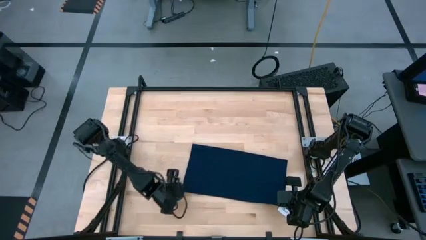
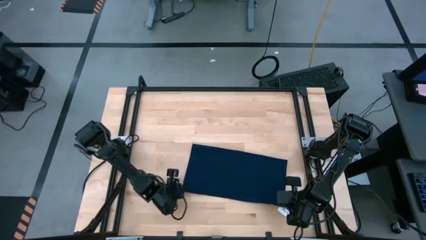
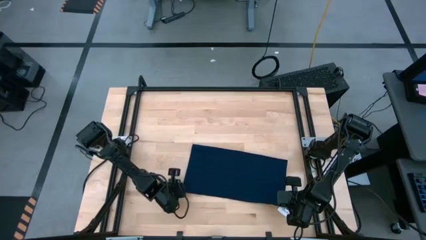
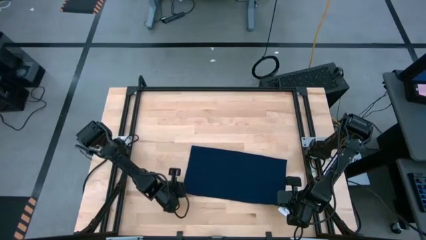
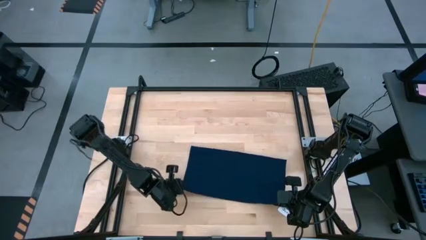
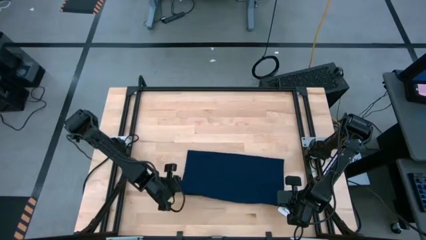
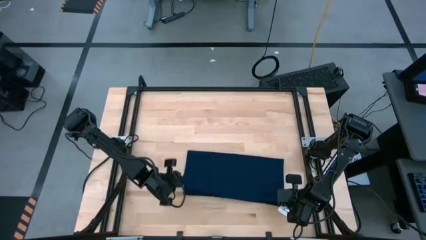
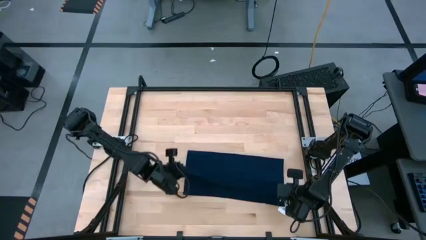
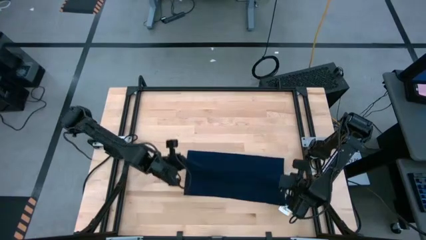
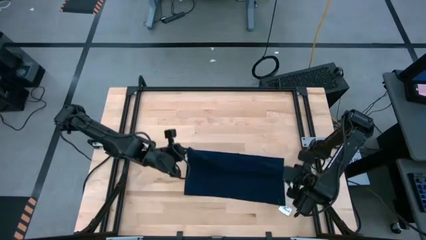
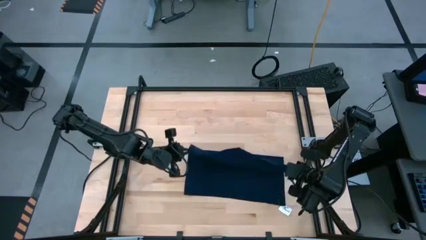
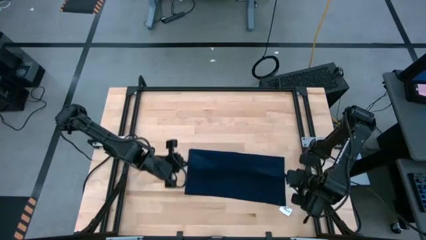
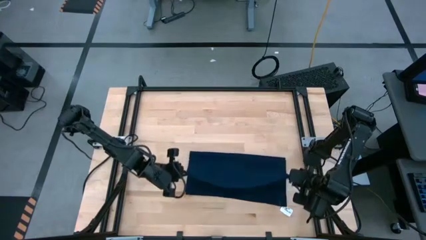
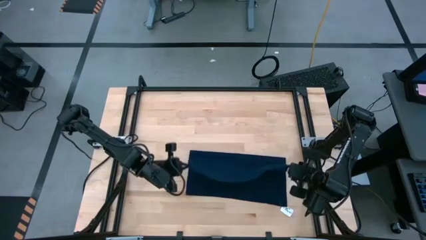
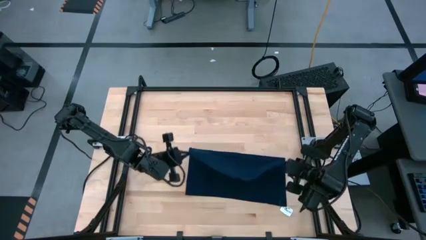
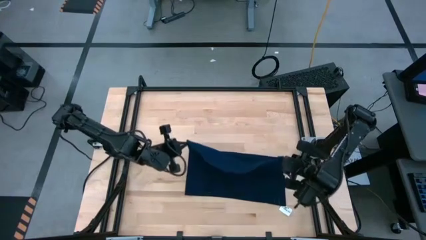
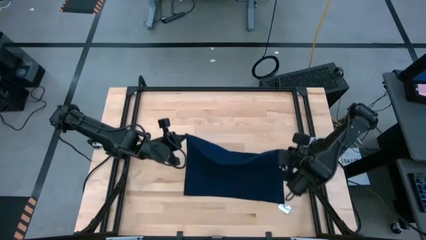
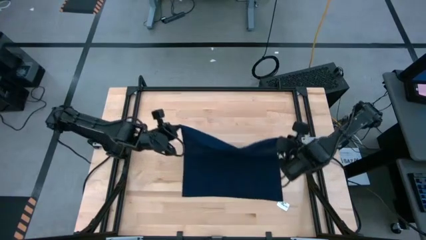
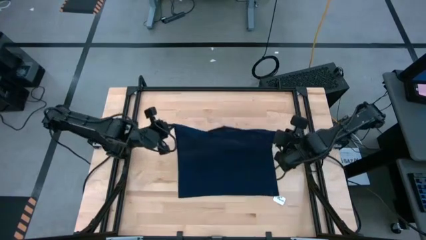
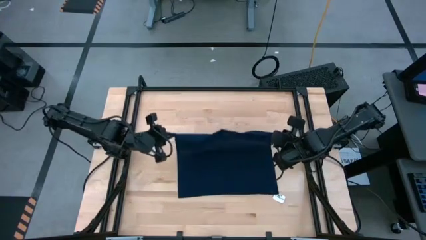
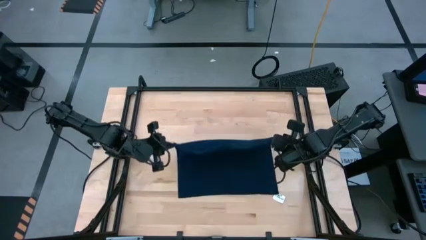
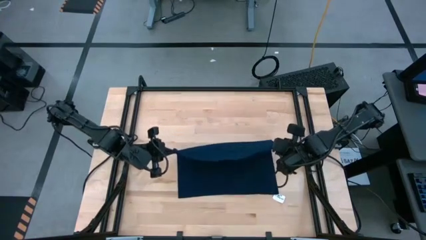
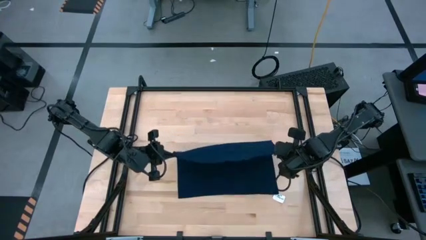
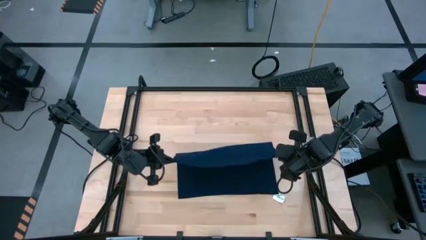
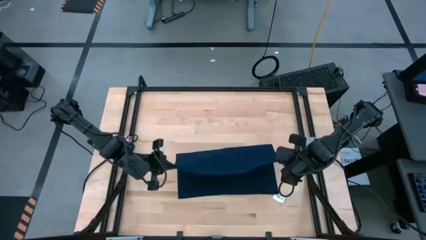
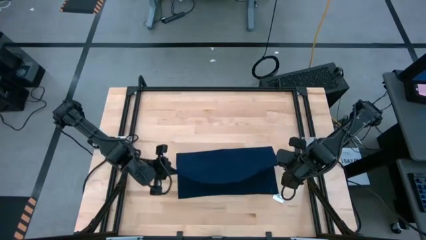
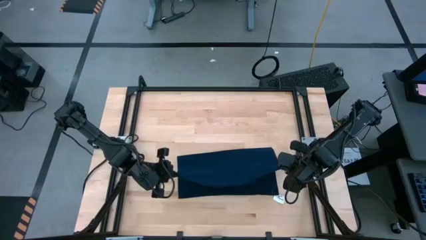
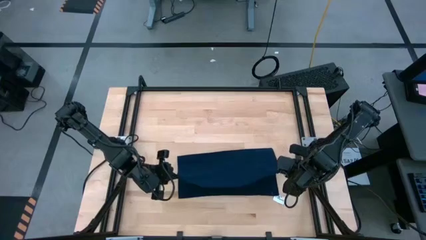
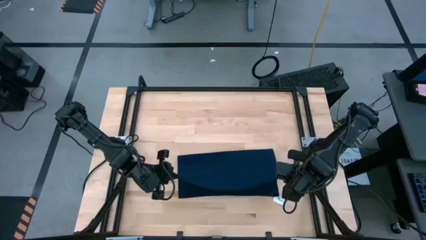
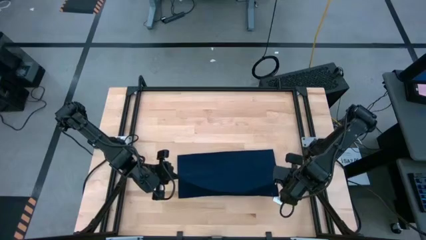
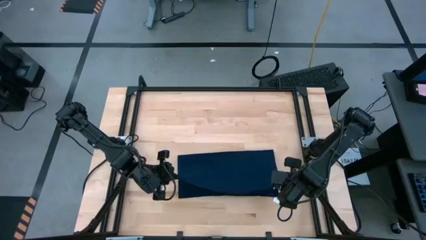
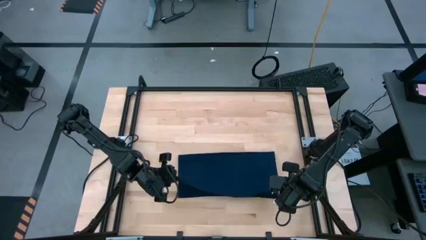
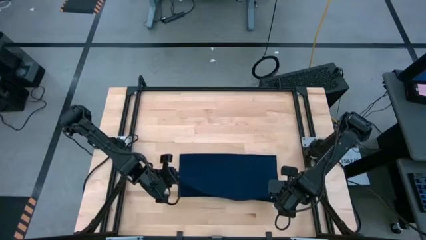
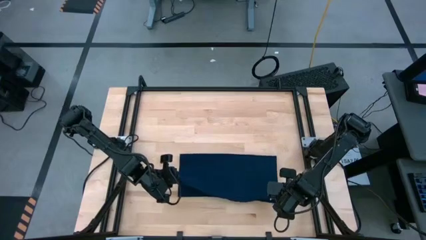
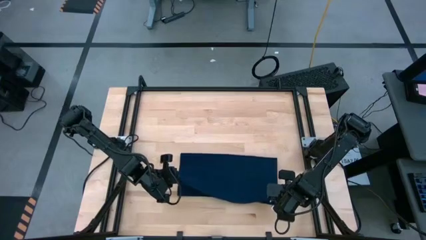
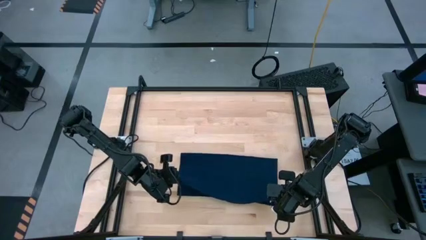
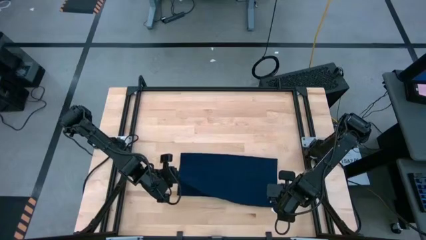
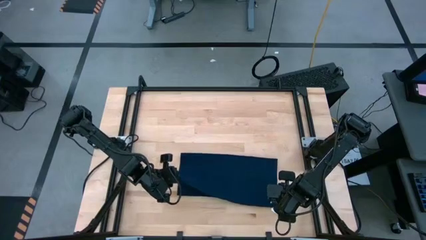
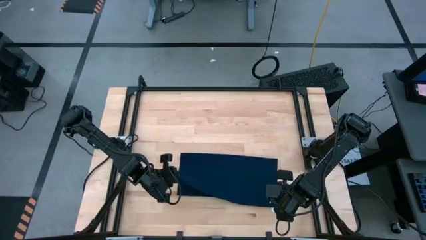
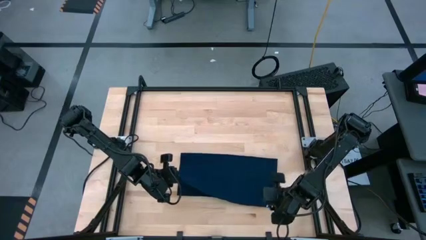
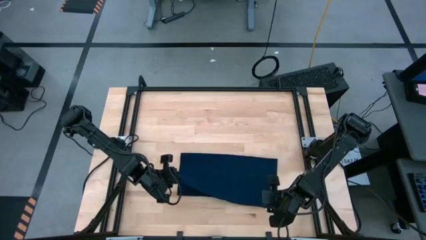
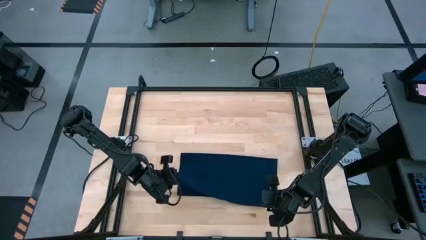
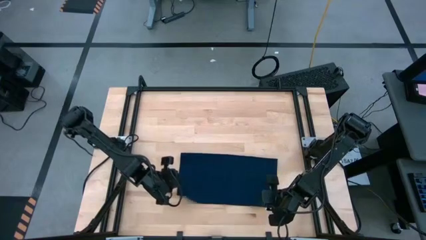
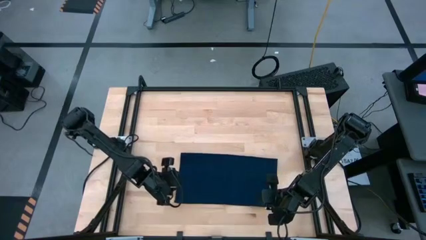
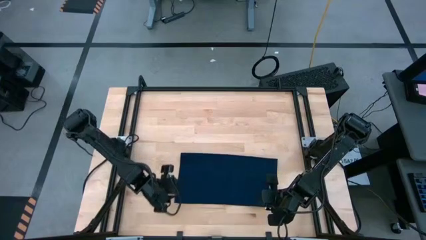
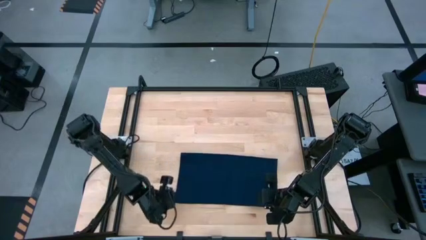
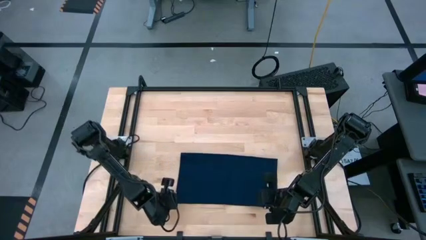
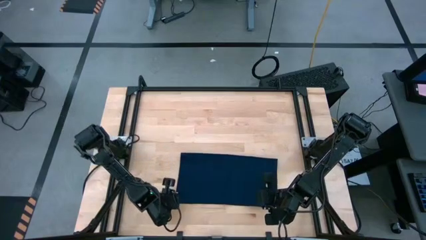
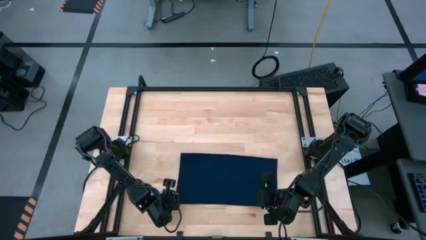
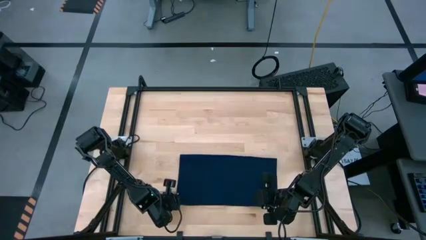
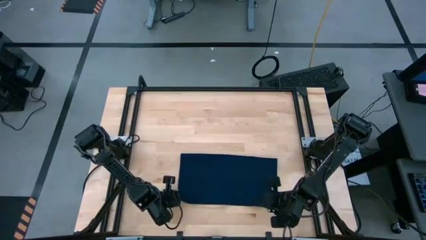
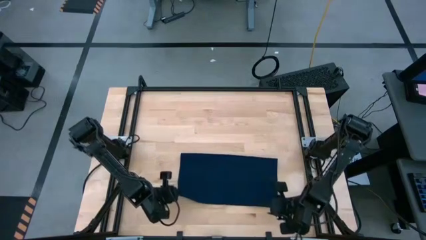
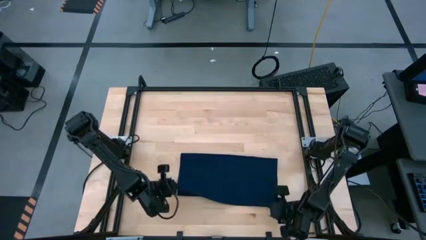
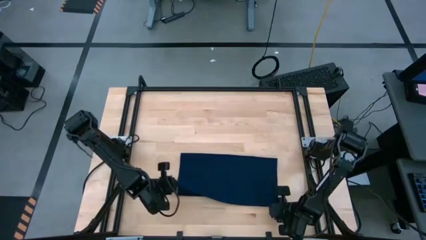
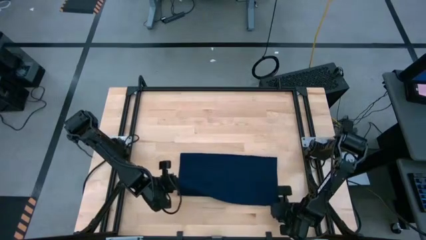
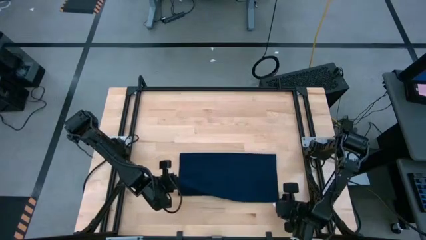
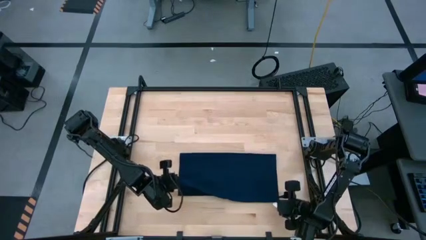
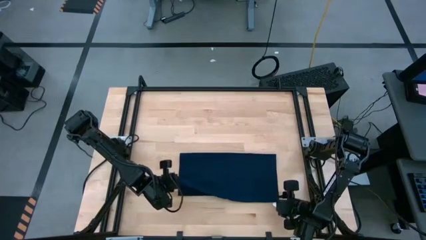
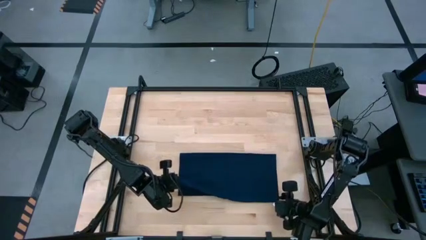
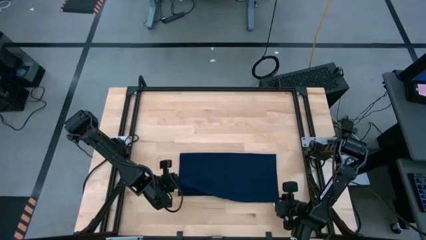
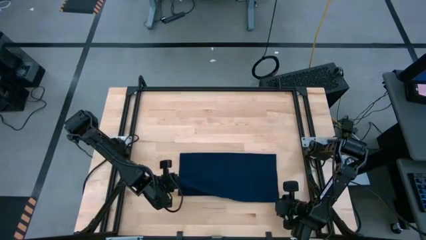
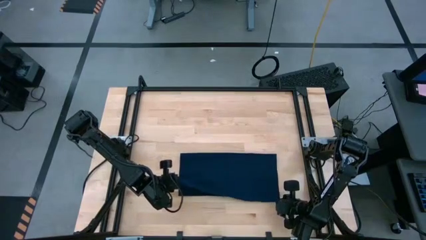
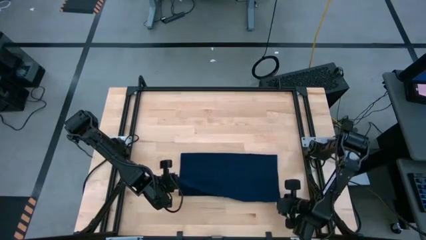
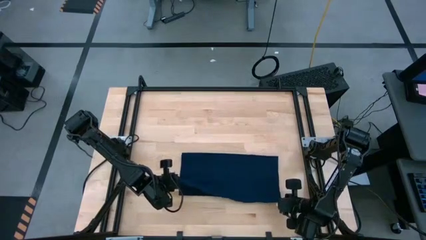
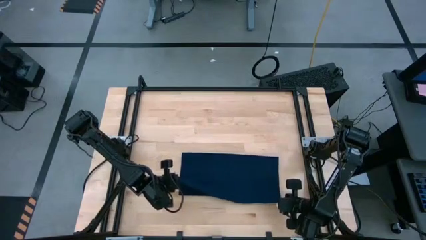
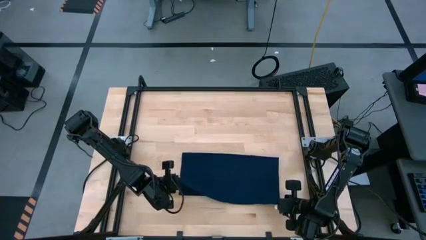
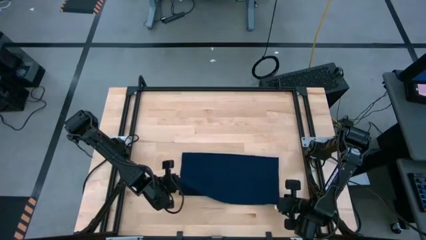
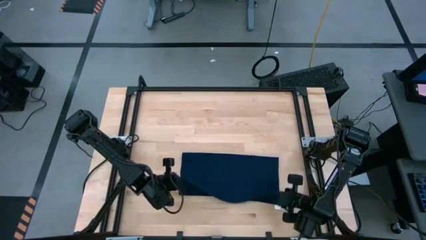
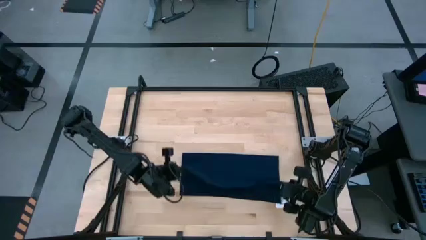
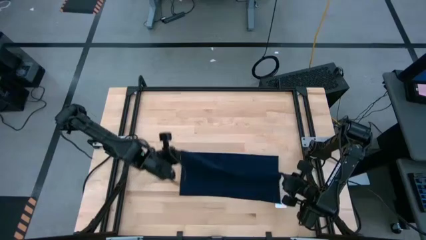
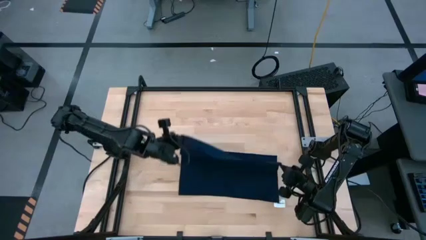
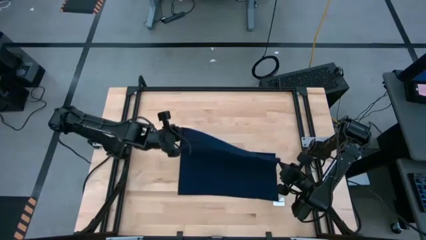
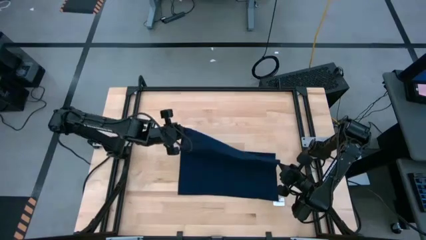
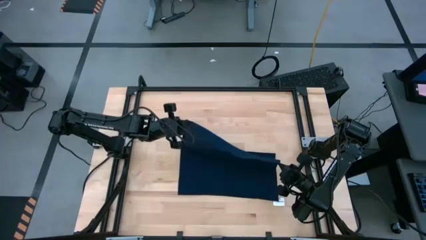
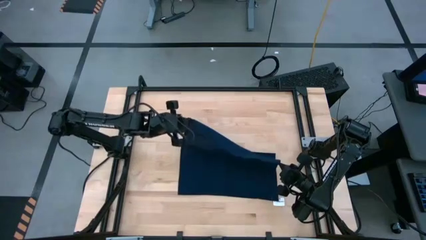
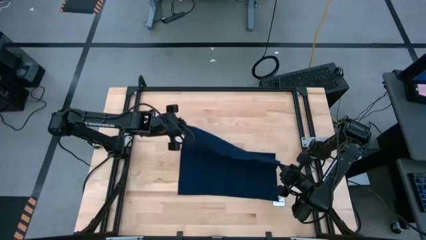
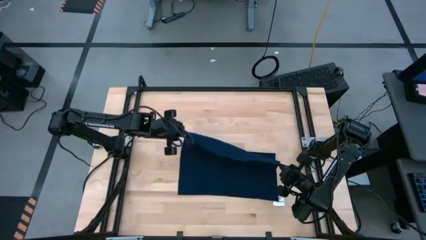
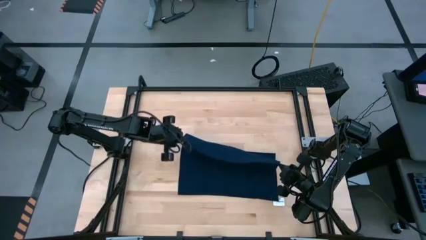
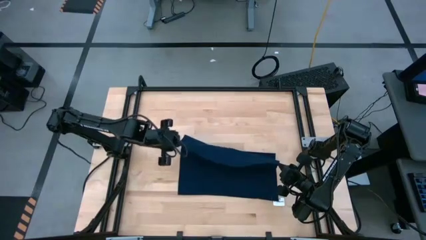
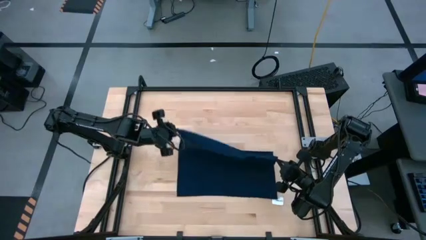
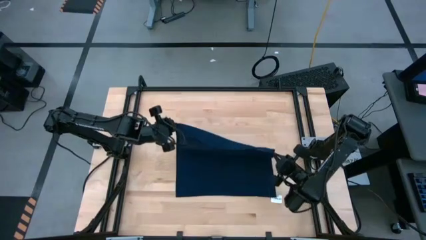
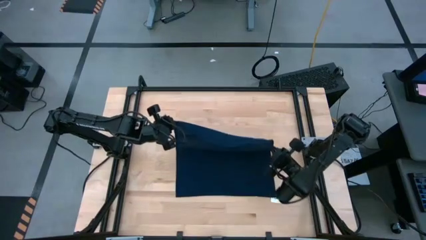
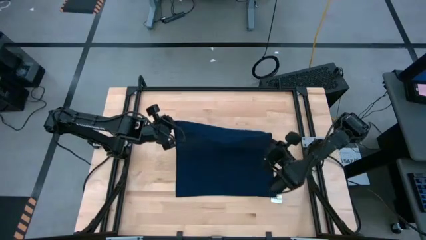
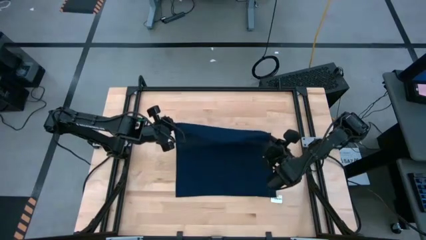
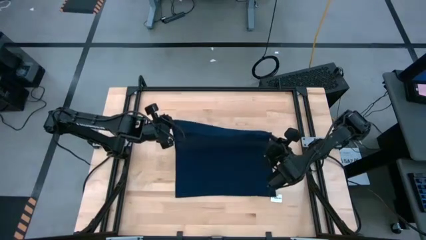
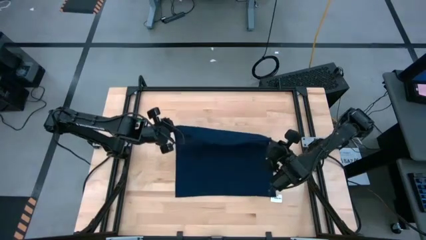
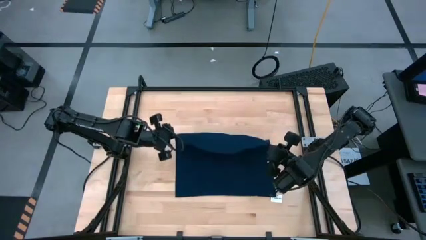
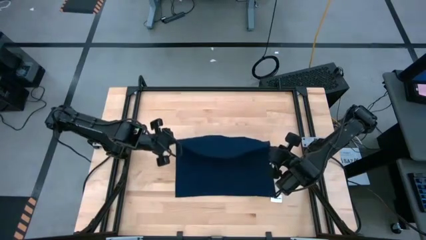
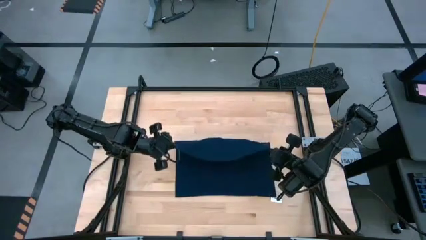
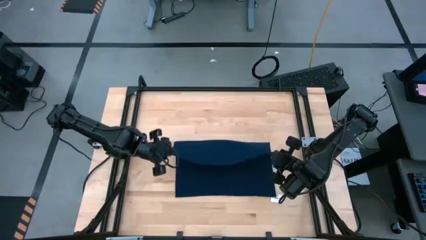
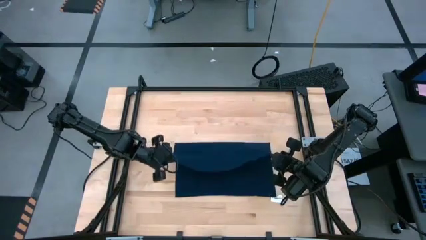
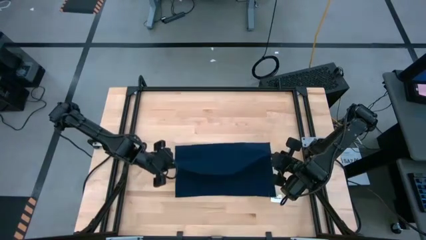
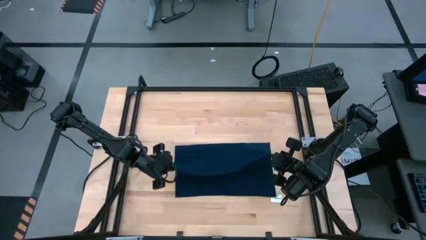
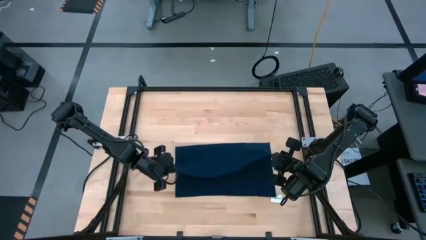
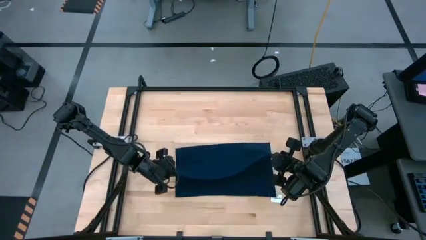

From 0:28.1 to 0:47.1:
Task: Roll towel into tight, uniform cylinder
Roll the blue cloth napkin
